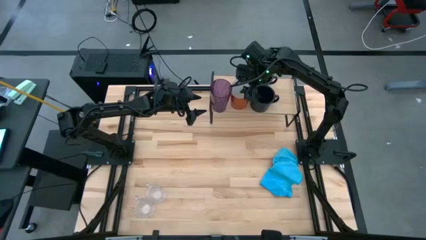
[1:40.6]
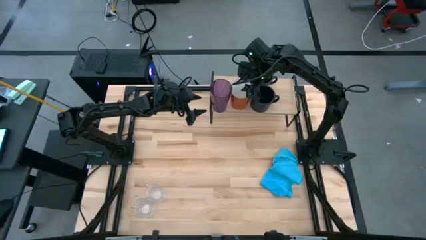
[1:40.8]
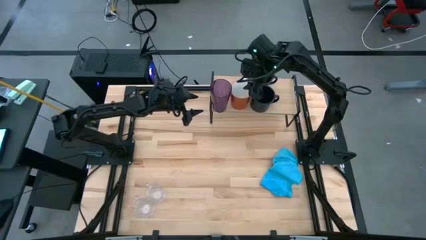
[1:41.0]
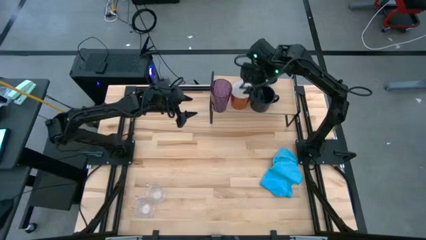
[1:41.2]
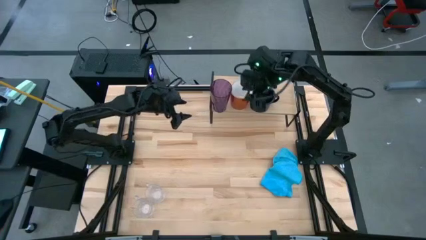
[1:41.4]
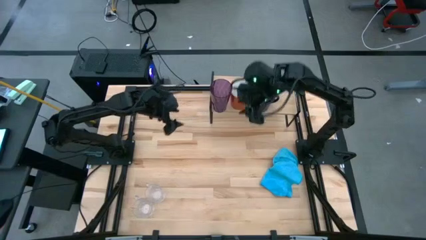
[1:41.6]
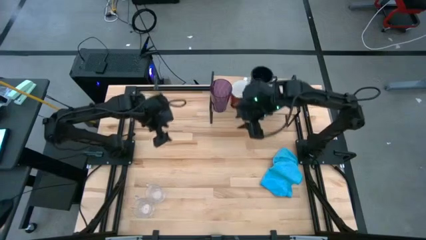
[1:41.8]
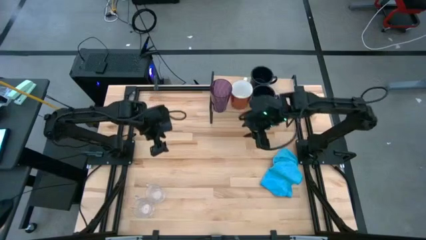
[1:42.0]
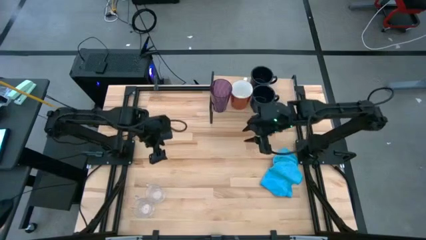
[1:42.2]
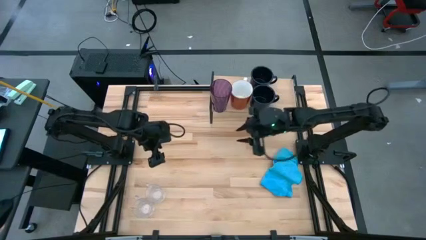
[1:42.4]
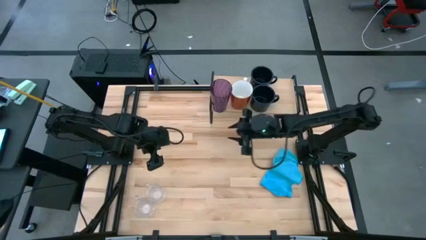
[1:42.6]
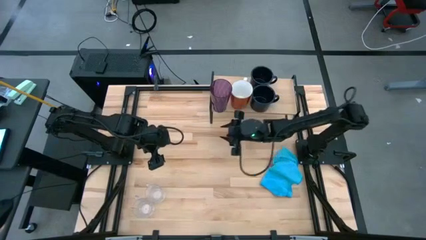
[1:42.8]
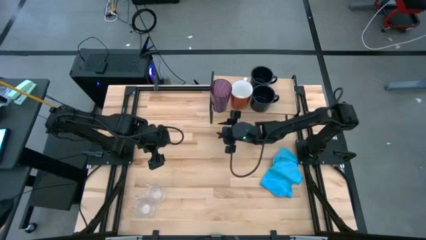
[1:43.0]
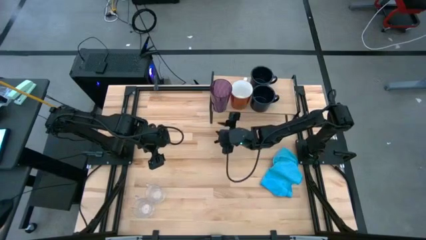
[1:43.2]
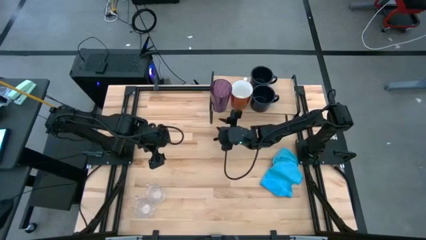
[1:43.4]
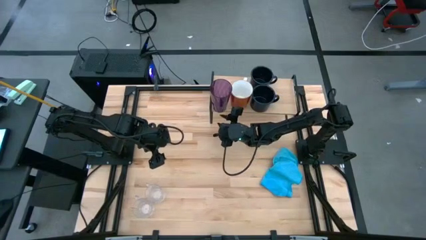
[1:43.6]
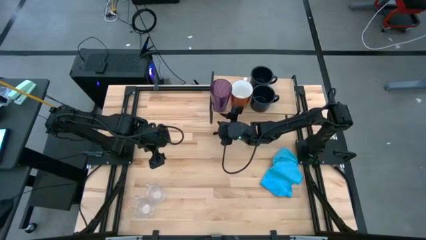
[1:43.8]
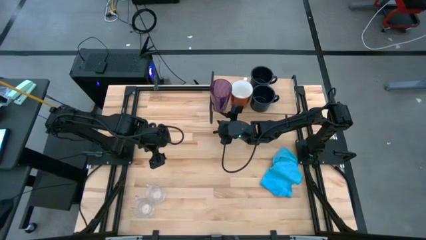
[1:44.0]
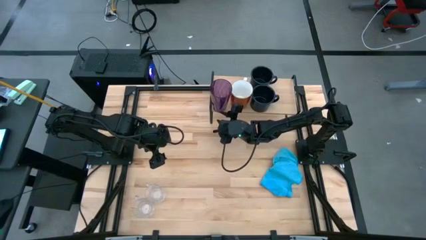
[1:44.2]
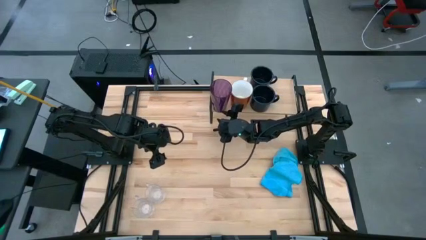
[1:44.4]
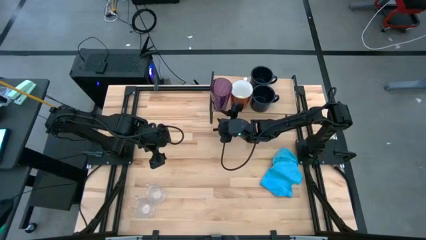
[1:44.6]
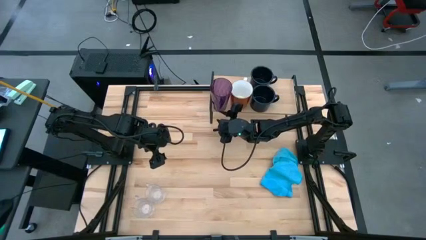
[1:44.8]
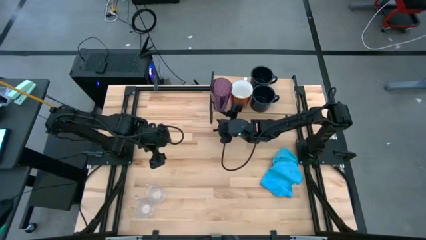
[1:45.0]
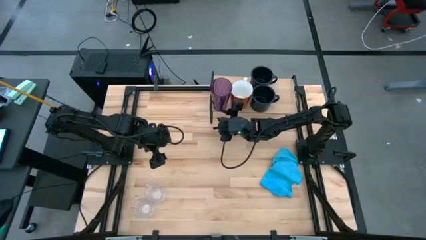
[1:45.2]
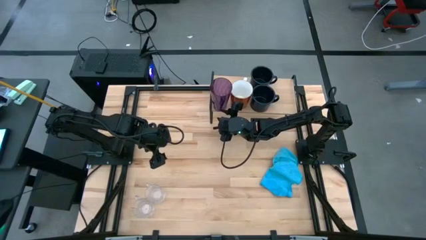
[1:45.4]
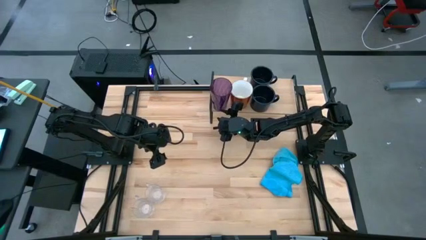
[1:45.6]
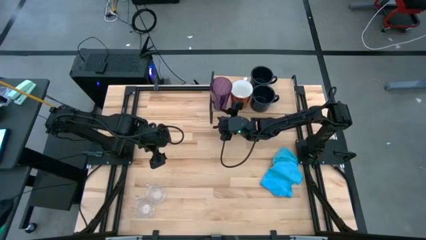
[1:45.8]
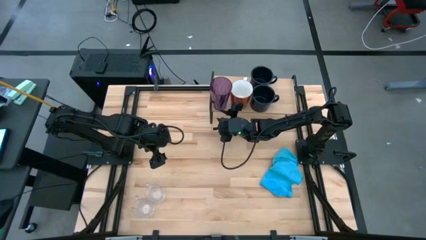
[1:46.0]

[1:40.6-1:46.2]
Task: Stack small to large cups/mugs on shelf
Adjust the cup on the shelf

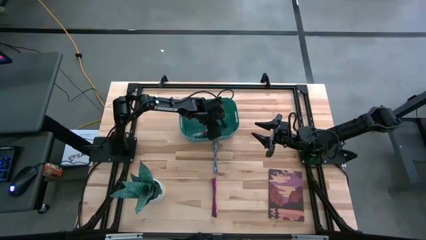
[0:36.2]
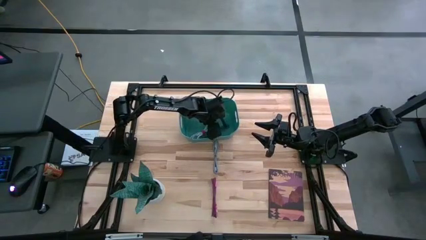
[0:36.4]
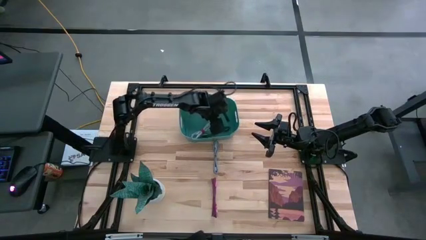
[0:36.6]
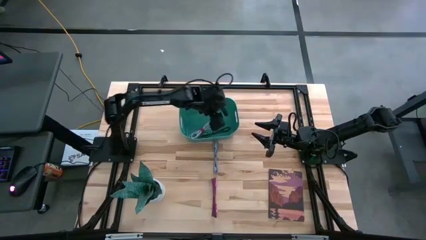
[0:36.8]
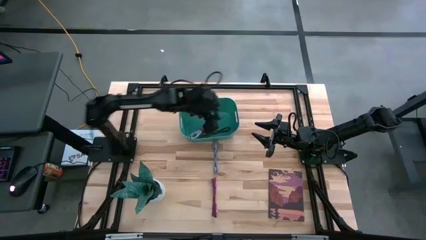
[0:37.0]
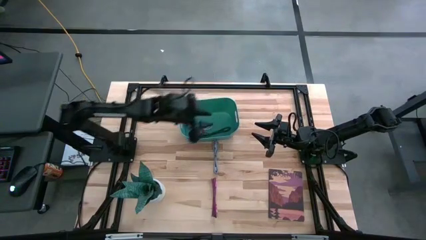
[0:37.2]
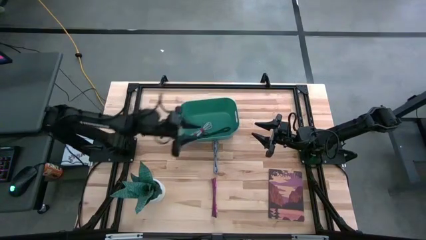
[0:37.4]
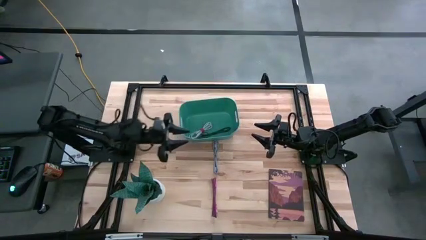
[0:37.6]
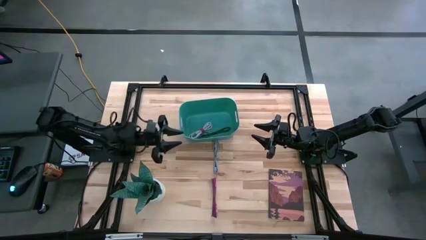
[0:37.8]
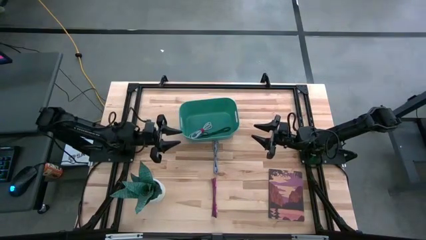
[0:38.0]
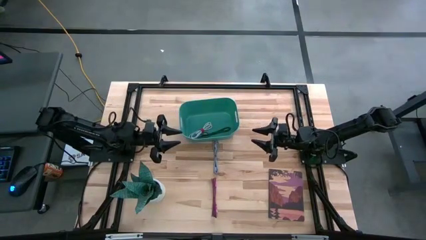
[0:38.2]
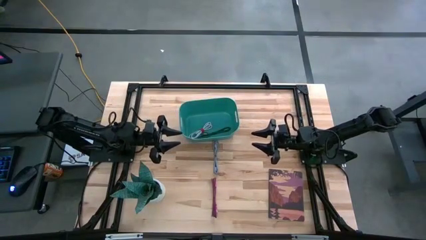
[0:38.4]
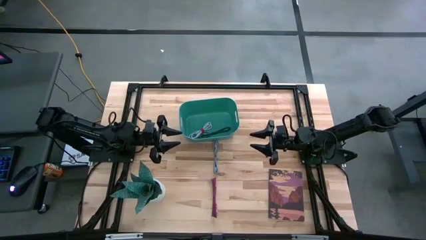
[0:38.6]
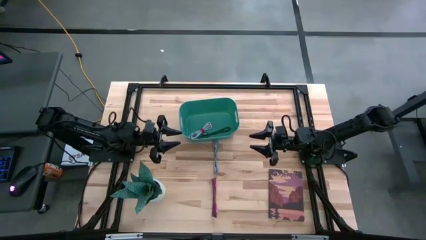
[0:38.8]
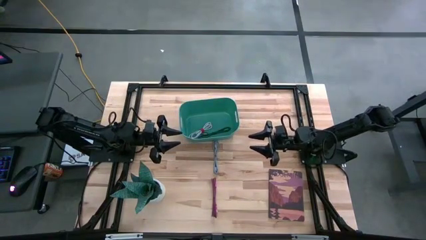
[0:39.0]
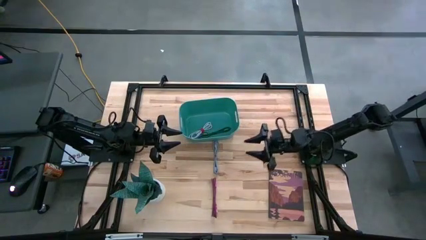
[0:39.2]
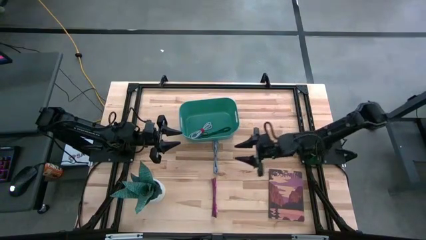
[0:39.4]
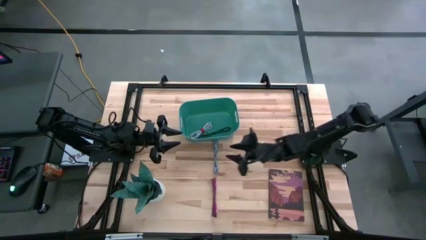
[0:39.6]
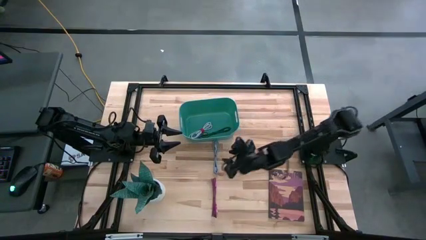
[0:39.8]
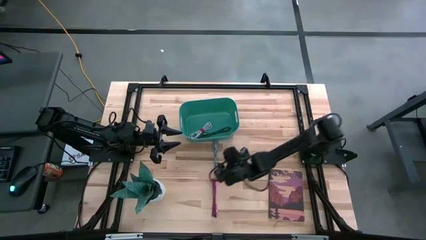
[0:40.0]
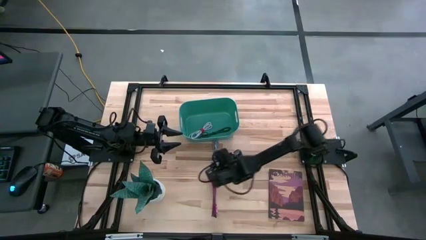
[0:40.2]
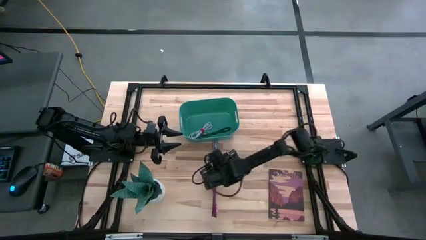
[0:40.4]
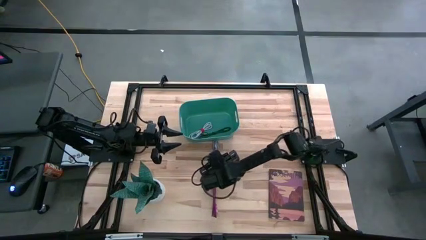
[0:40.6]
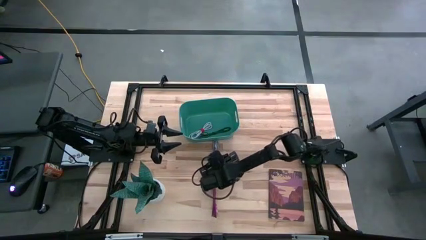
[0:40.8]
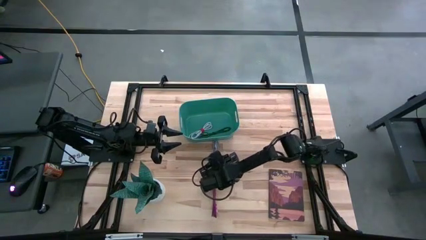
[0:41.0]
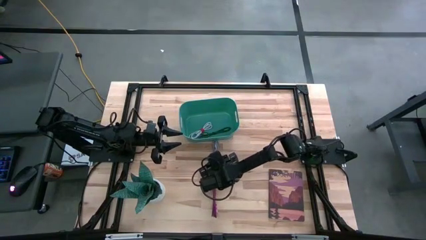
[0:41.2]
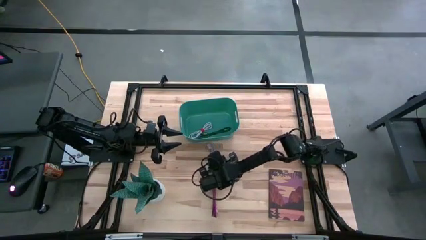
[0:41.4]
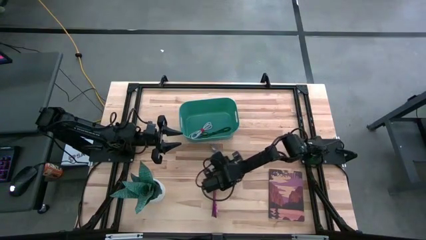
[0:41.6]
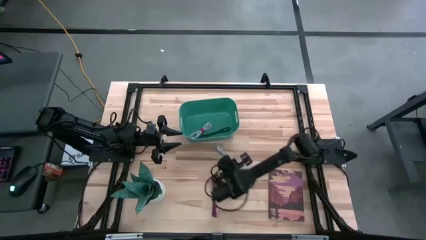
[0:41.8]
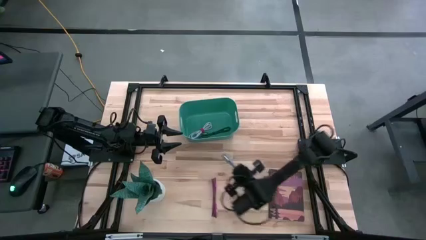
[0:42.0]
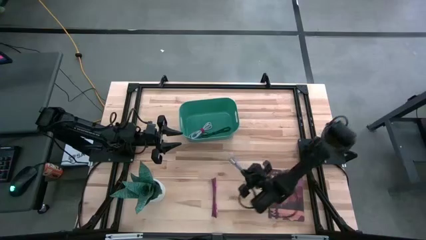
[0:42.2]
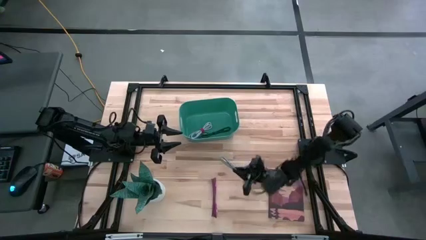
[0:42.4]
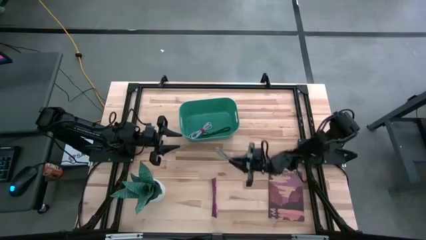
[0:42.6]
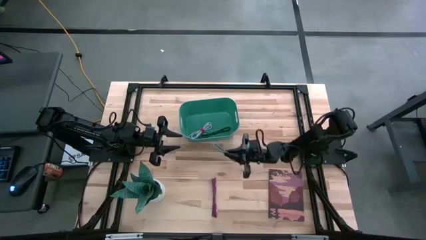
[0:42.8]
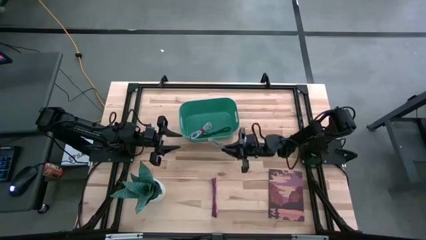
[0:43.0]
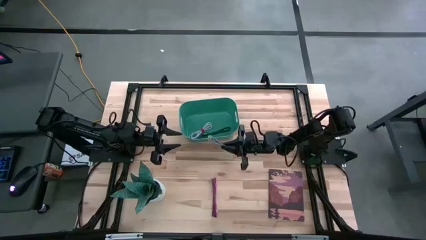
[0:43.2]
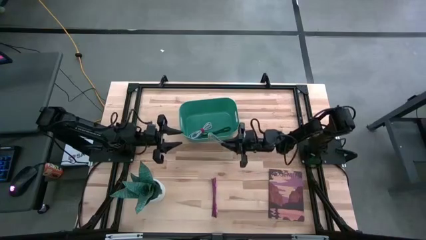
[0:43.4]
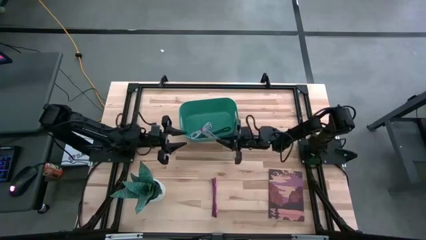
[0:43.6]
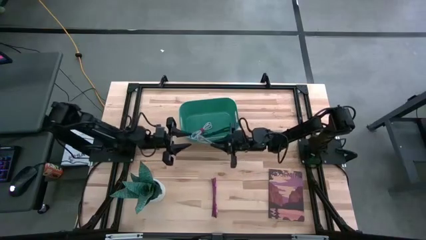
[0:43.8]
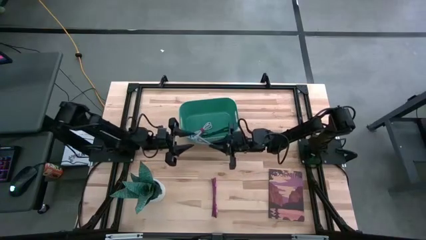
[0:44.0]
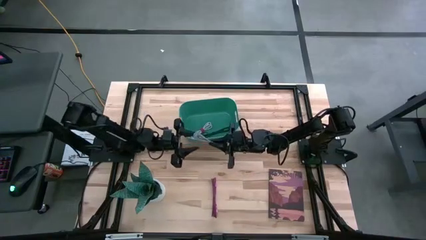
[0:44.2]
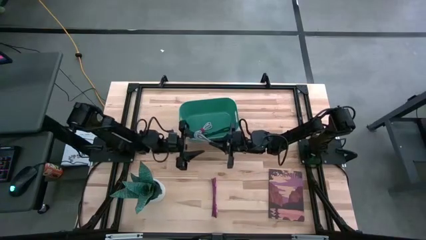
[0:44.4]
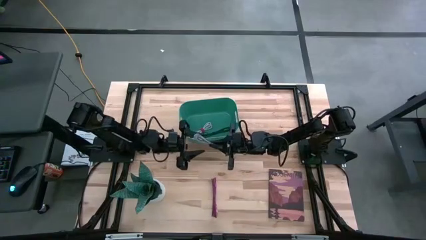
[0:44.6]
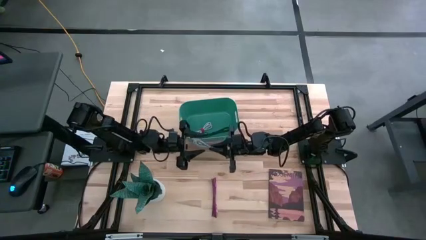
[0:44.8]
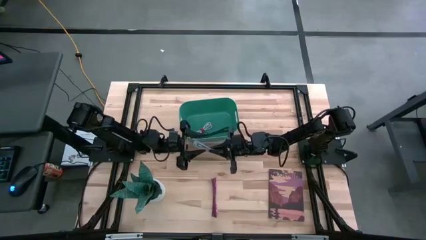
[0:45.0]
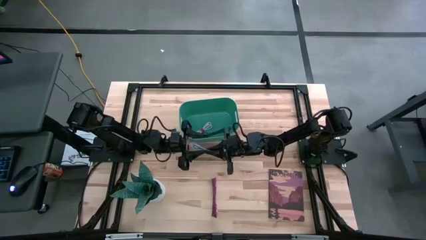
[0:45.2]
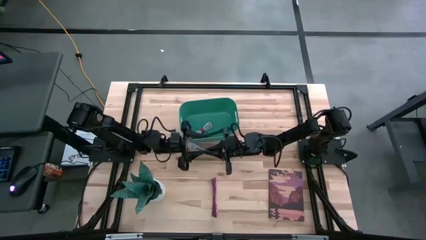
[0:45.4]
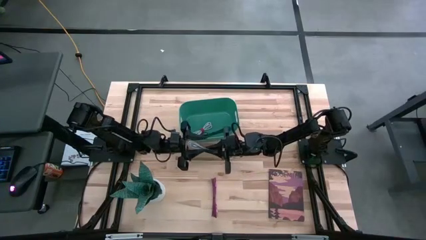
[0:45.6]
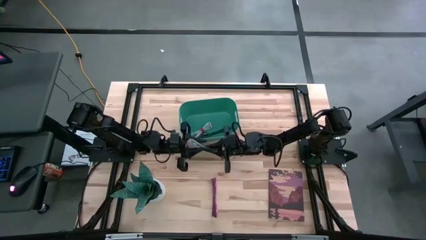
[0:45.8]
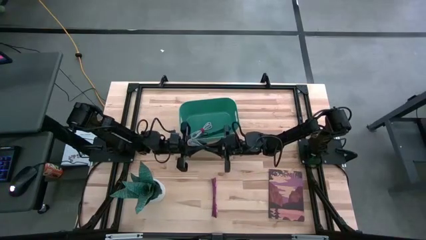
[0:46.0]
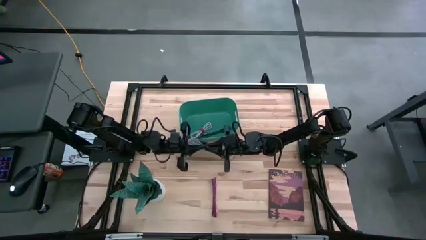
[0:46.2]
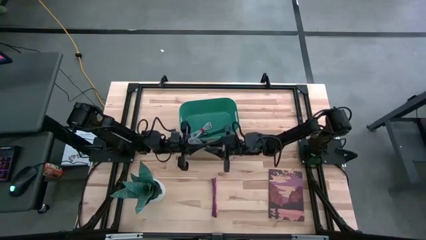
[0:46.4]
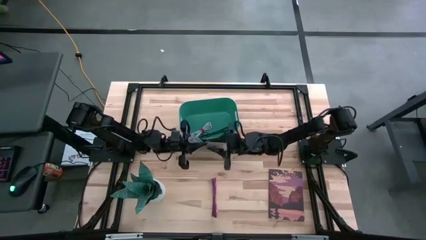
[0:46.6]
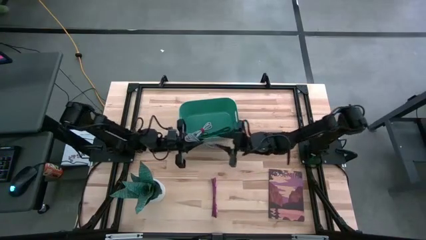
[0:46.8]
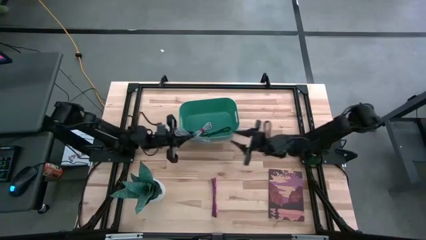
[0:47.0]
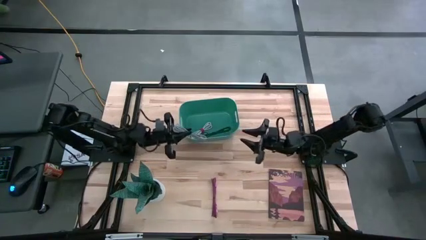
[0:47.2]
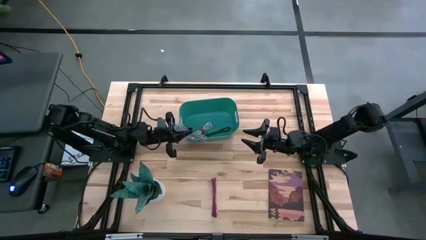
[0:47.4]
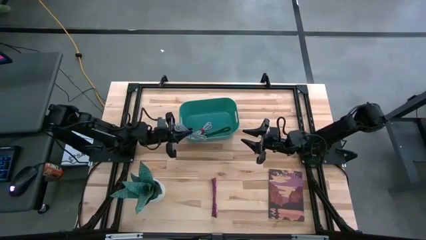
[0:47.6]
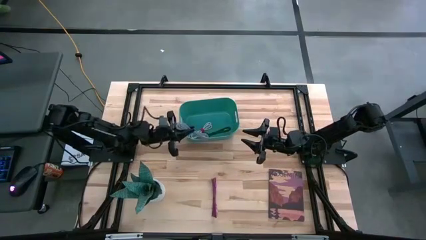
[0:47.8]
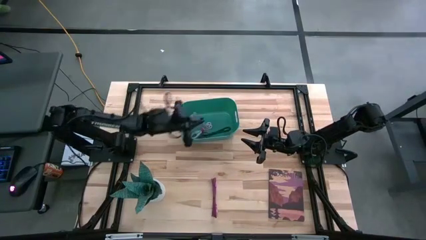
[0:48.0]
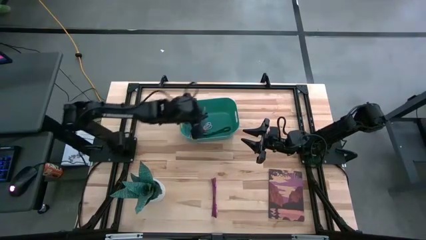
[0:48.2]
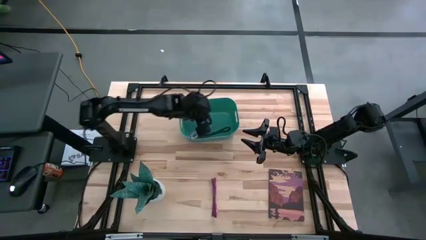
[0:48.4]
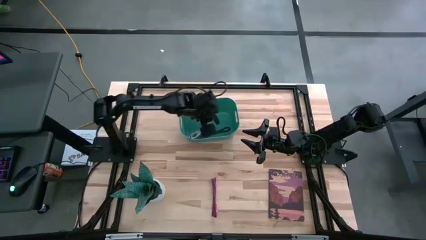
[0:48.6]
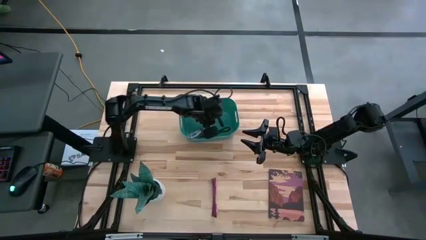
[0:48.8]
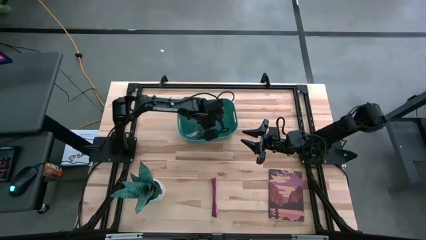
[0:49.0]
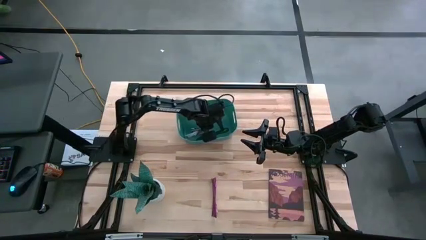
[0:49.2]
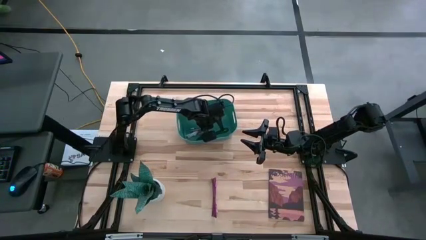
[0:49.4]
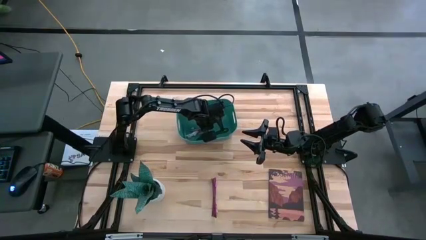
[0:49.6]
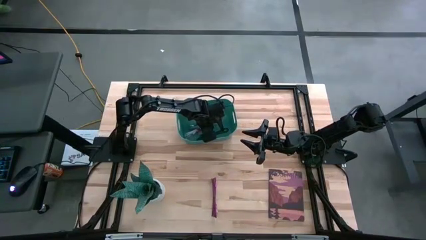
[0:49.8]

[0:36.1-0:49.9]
Task: Pick and place USB-C Cables
Put the white and black charger cable into the green bin
